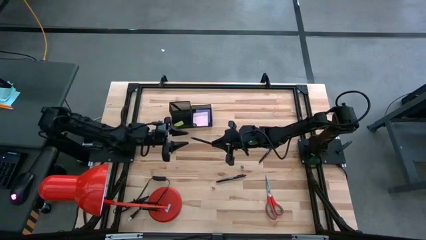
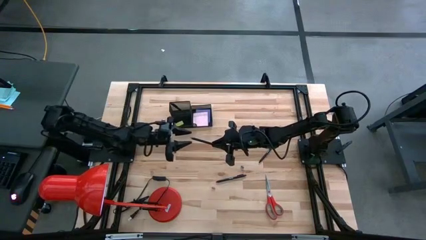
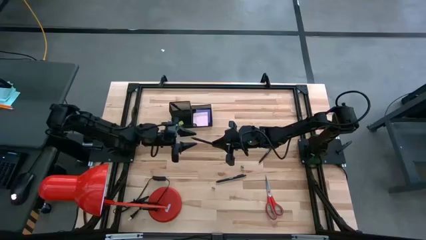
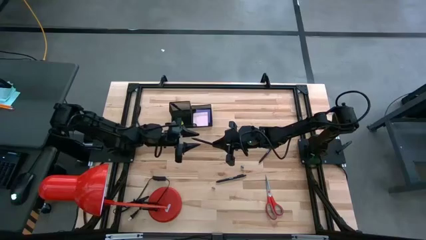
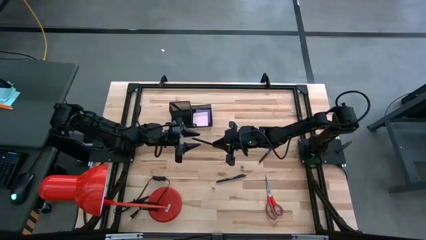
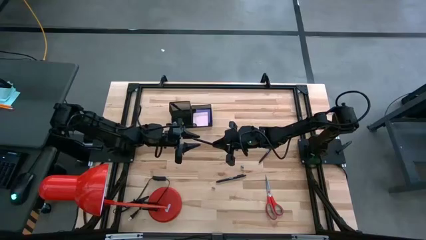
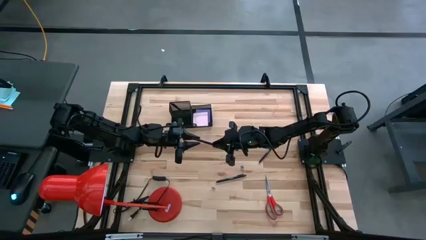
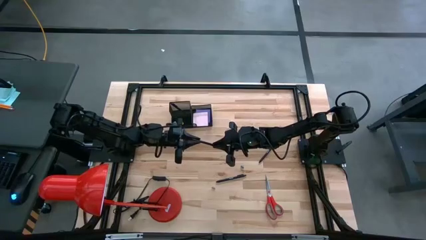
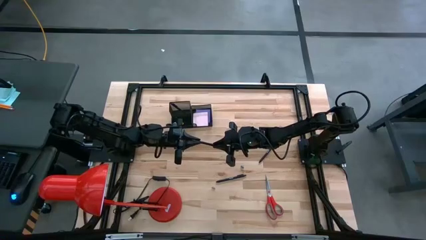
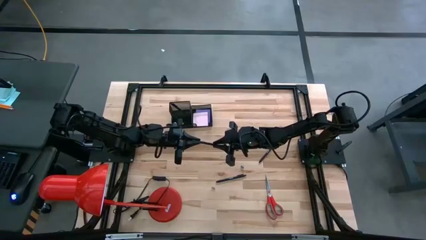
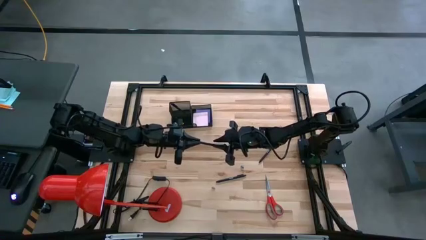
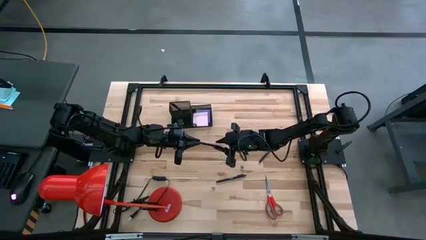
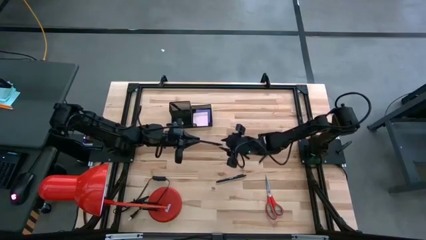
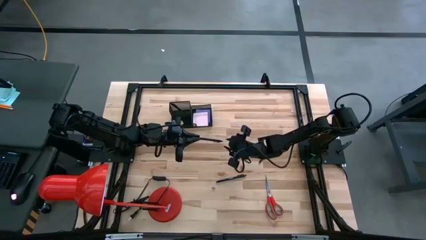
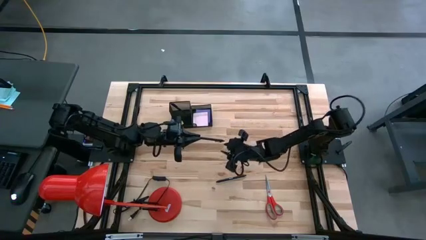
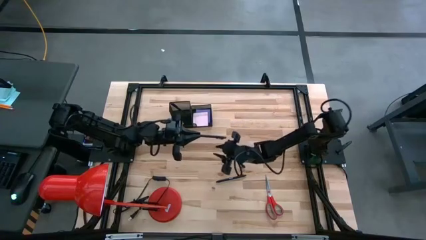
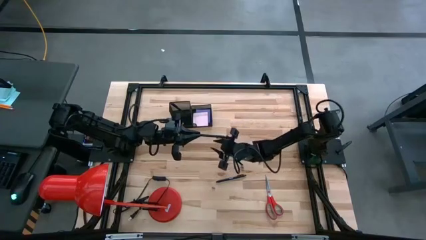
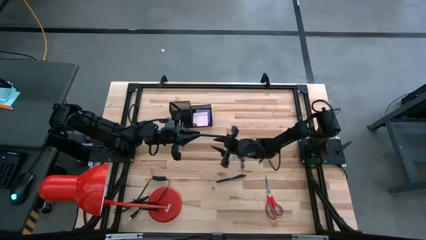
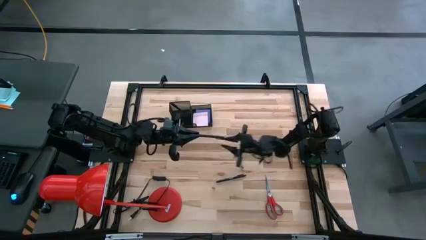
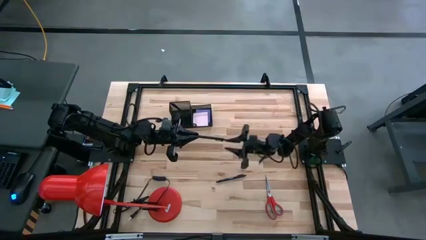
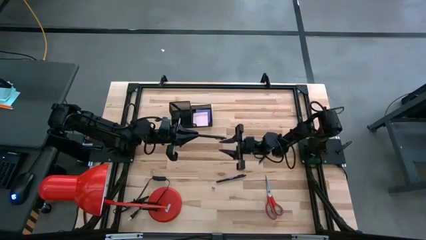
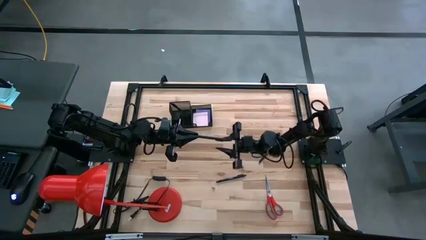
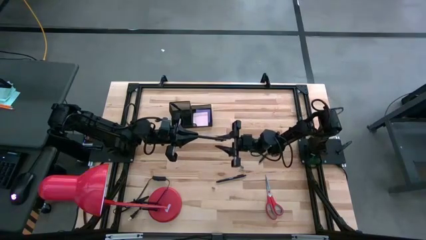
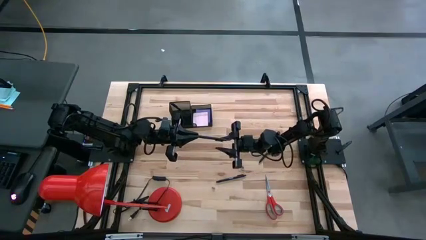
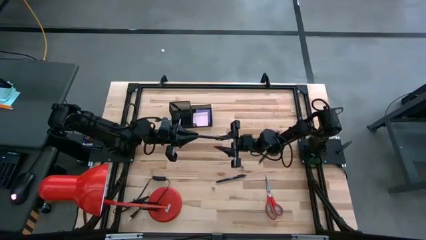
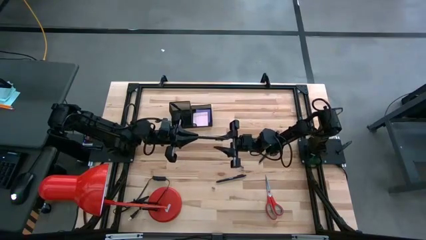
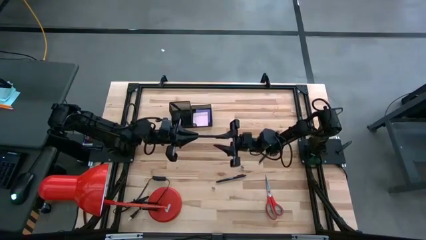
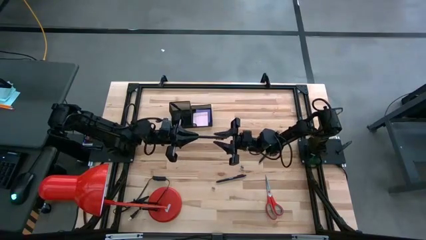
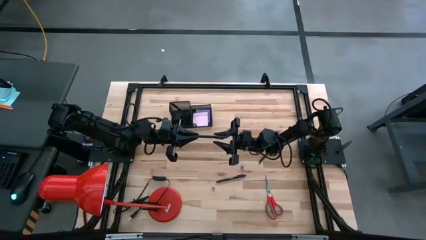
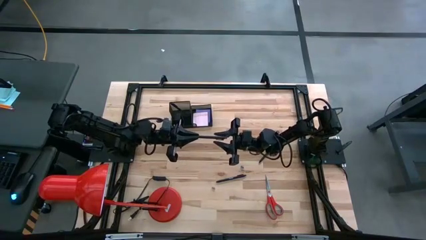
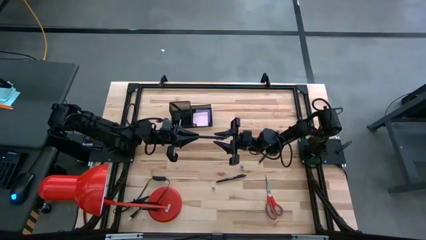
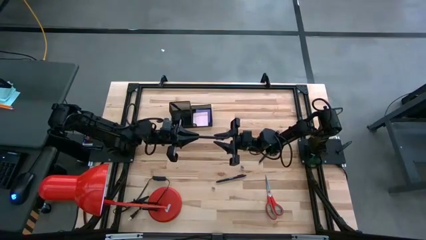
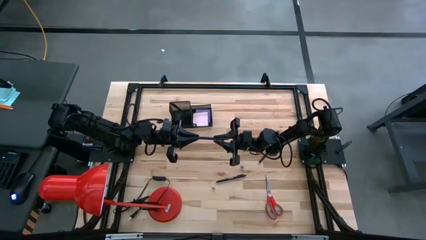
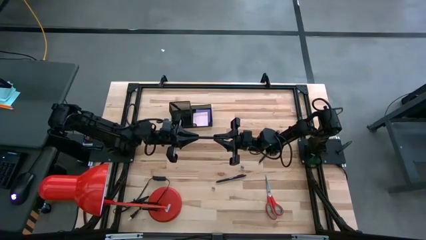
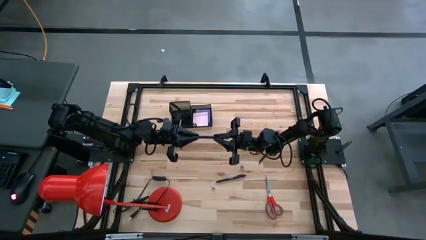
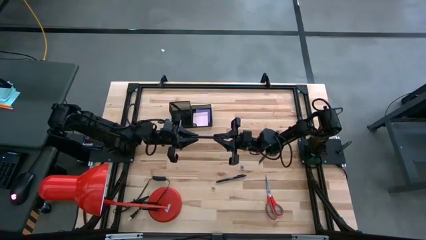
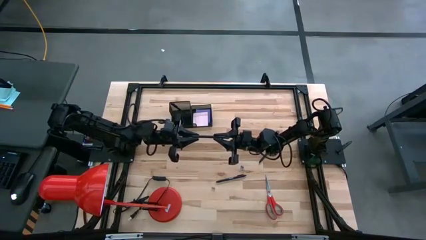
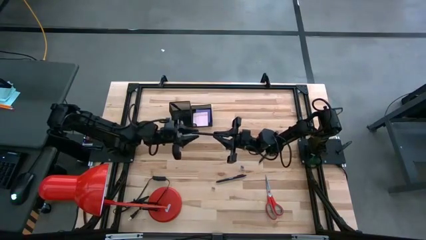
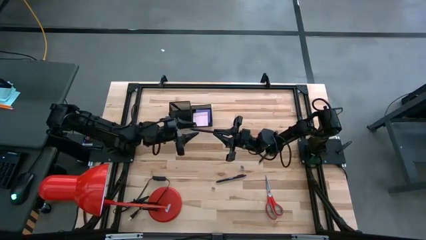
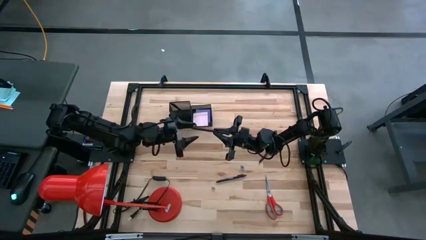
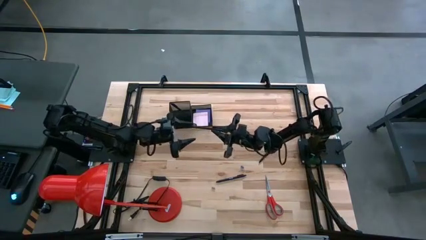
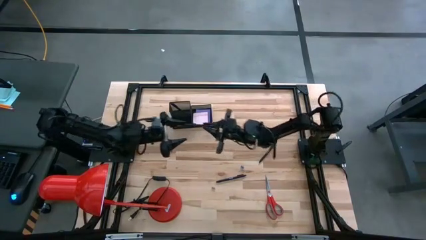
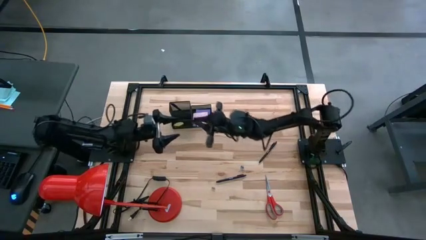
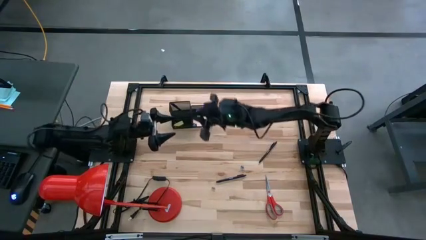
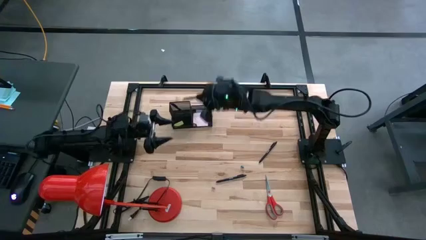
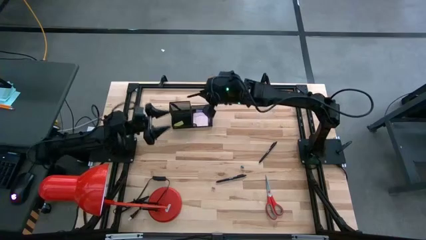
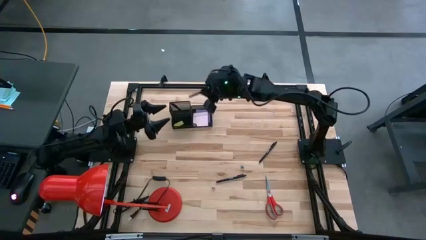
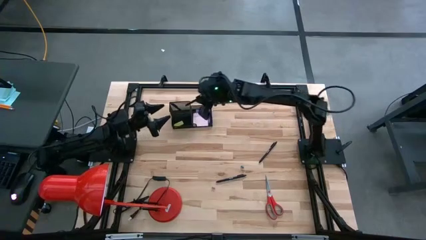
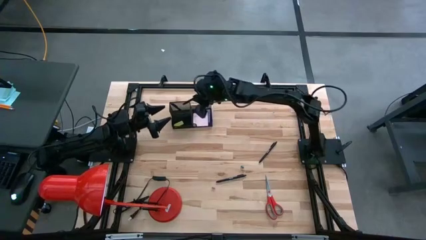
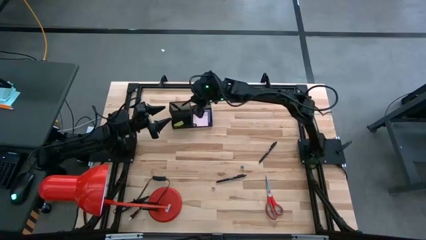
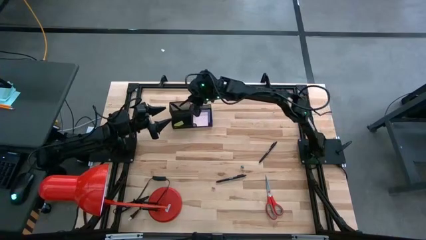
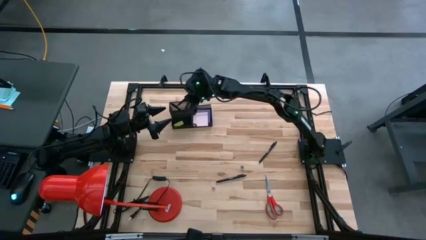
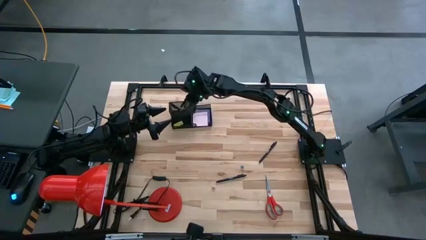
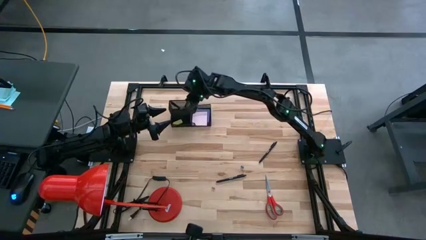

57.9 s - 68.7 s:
Task: Pick and place office supplies into organizer
Put the black pen into the desk organizer

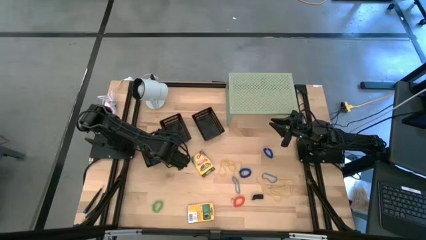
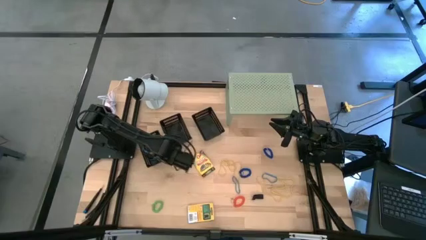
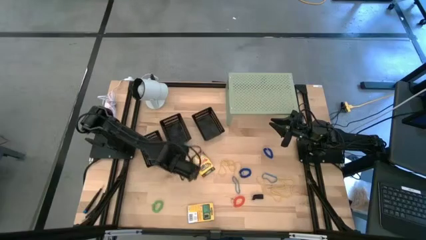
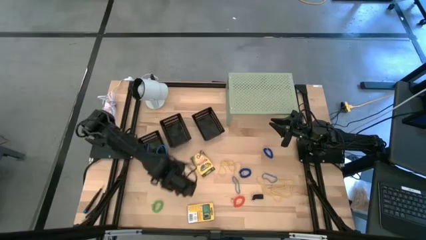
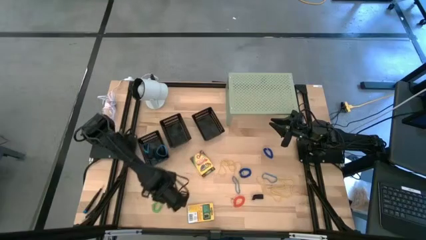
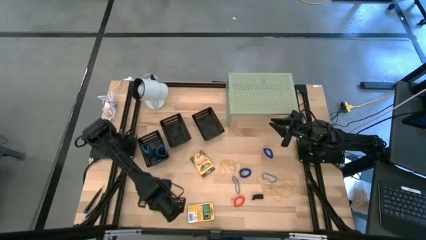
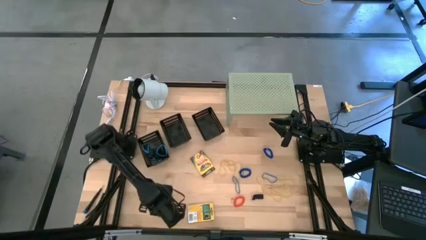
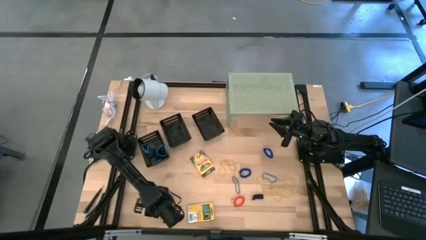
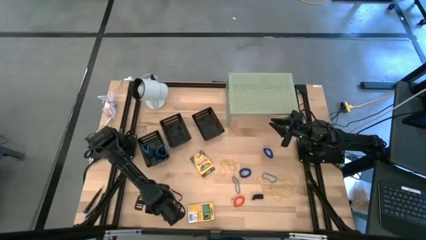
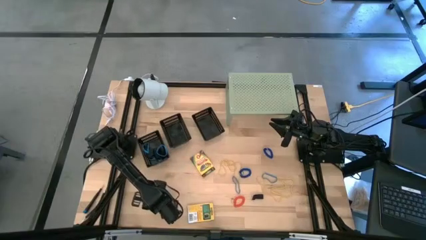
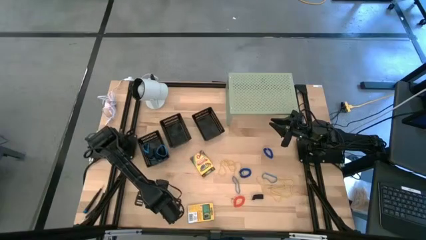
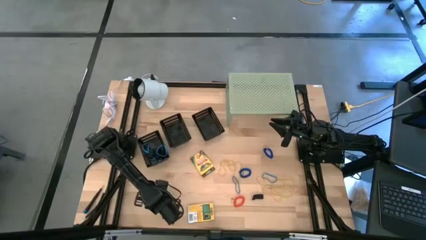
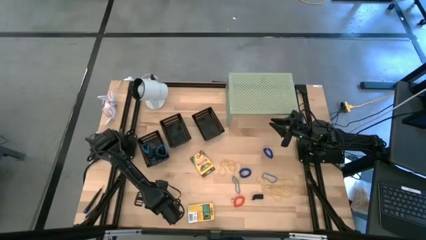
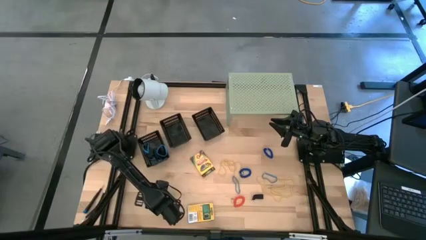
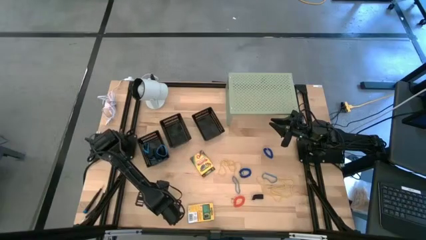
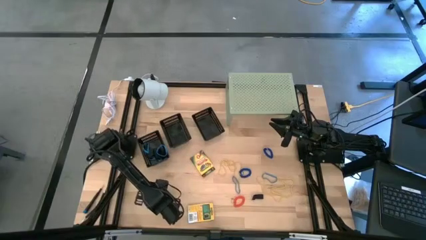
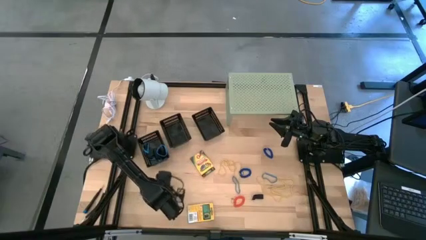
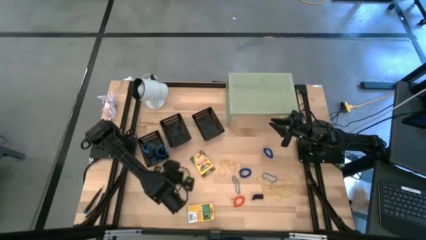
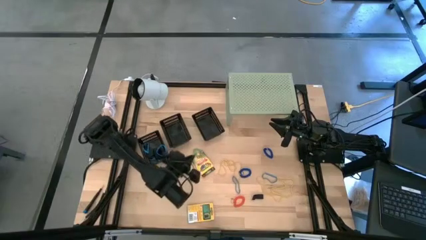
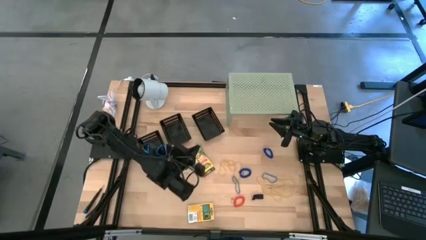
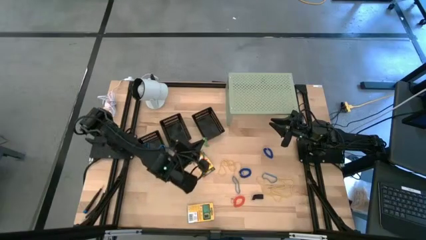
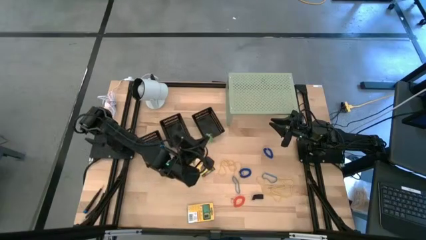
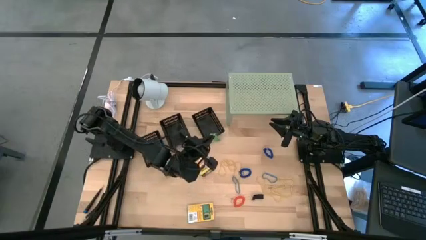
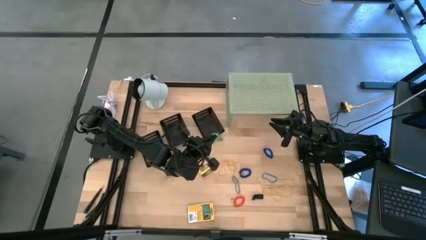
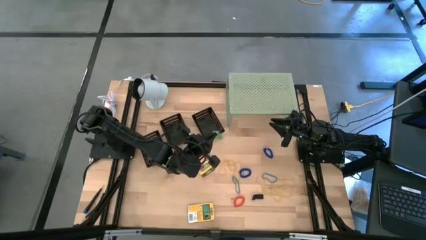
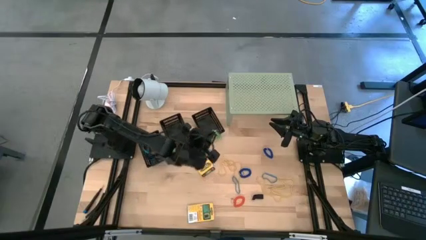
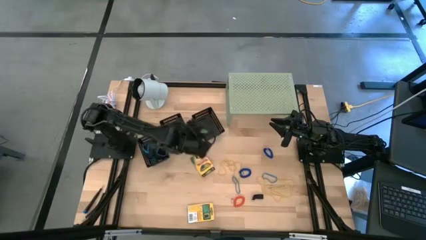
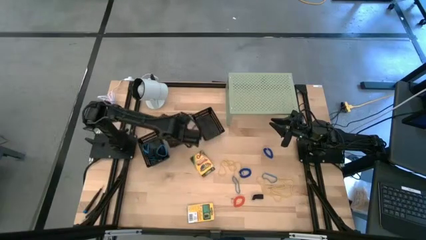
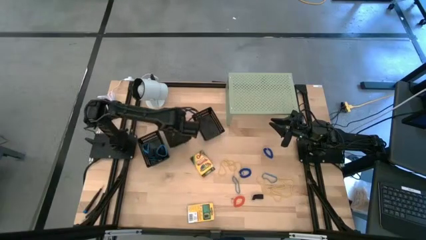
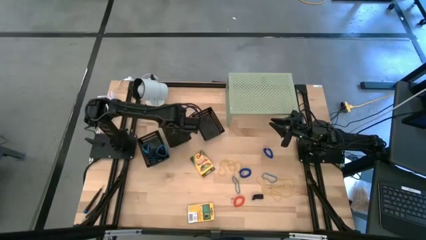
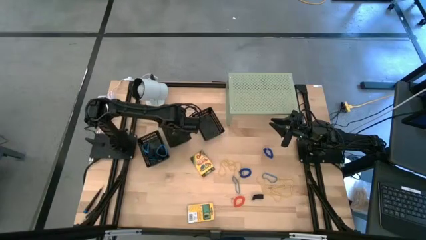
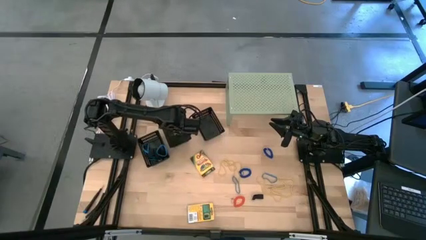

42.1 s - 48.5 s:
Task: Pick & Place Office Desk Supplies
Put the green spring keychain into the middle black basket
